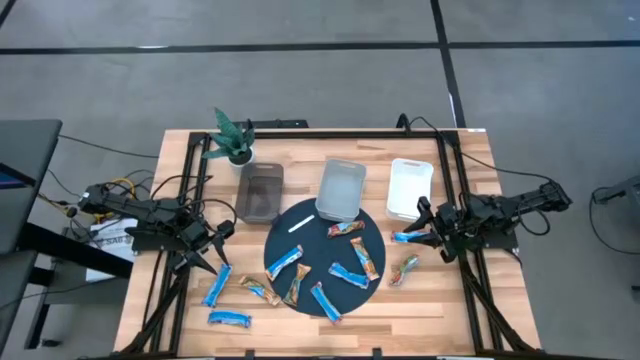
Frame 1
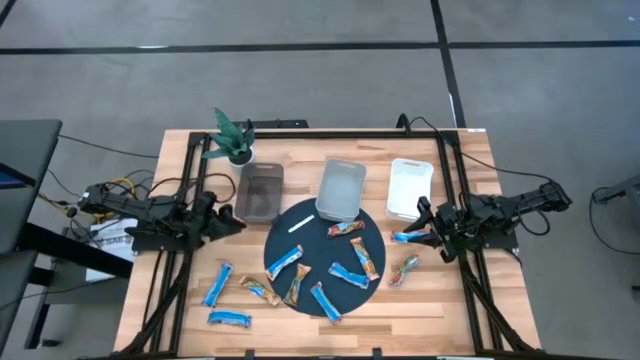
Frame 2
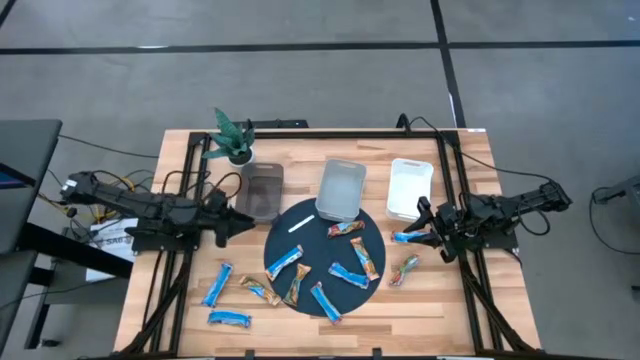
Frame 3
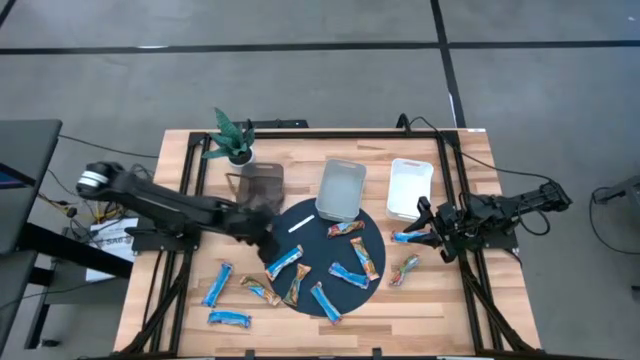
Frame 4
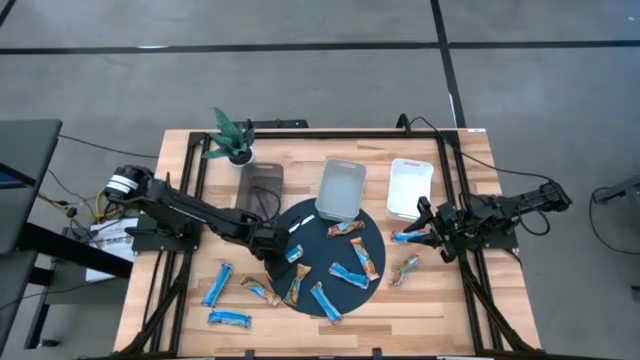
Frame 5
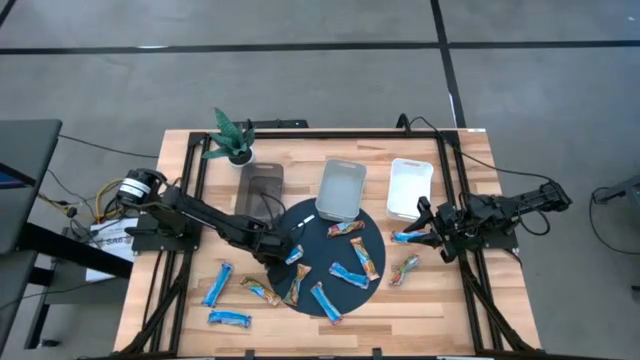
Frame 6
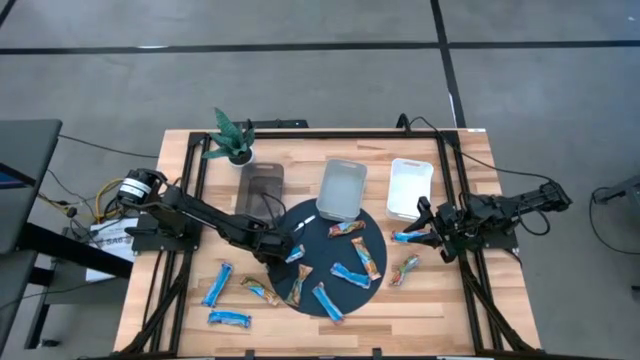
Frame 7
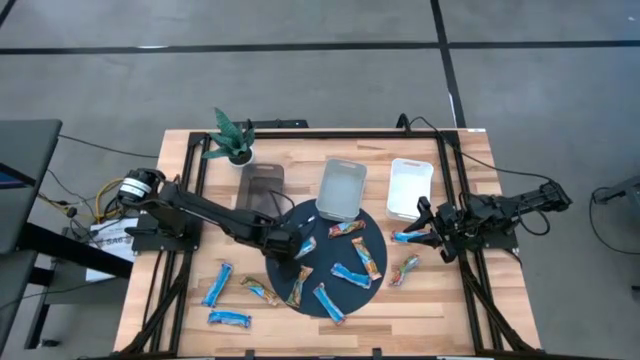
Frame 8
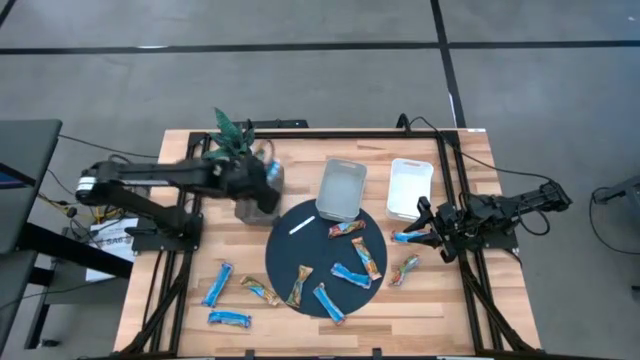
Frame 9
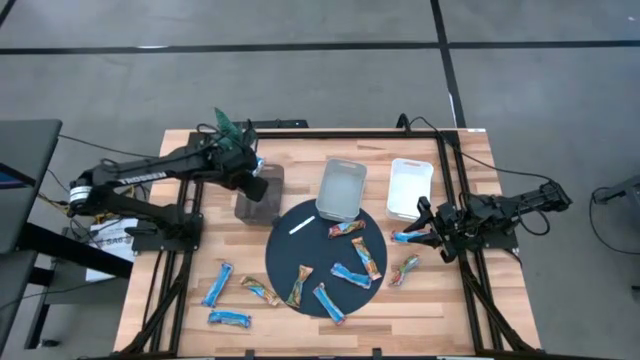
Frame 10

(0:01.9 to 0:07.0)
Task: Pick and place Granola Bars by type
Put the yellow granola bar into the black bin

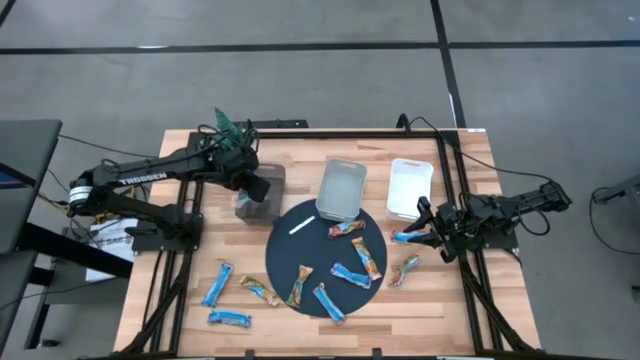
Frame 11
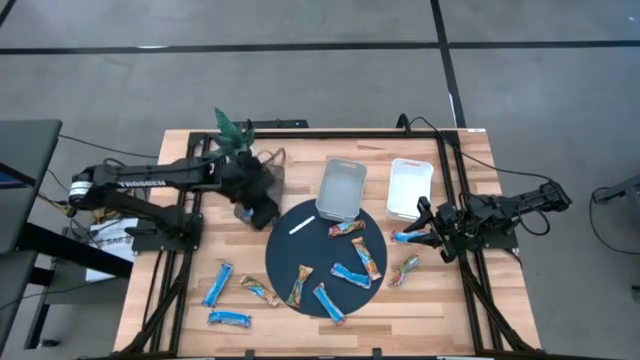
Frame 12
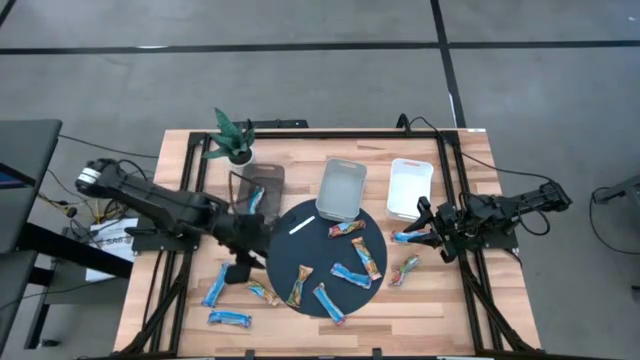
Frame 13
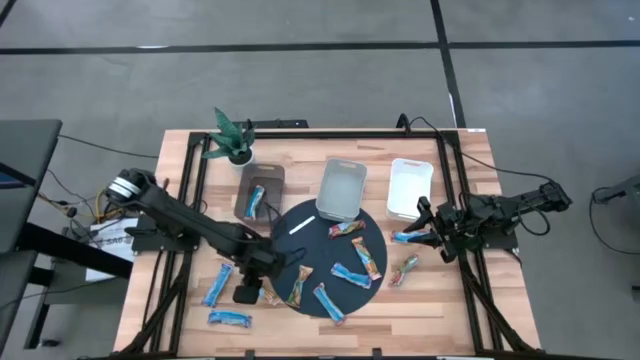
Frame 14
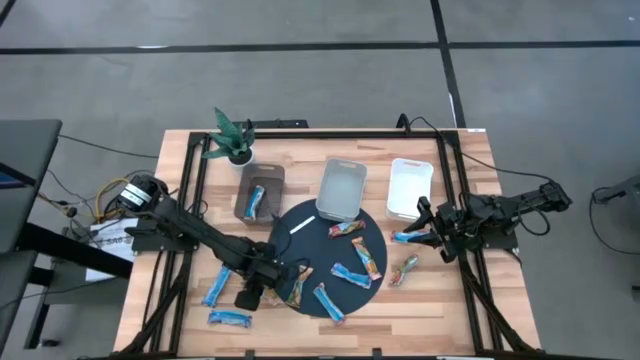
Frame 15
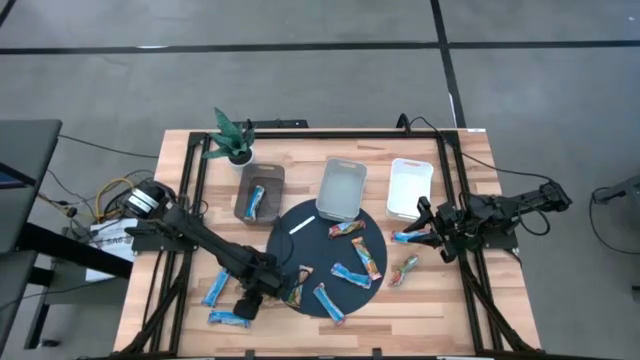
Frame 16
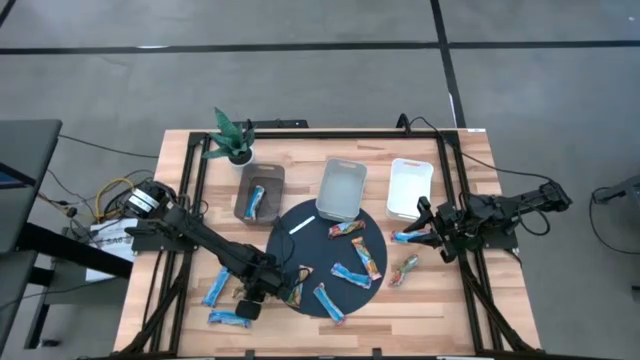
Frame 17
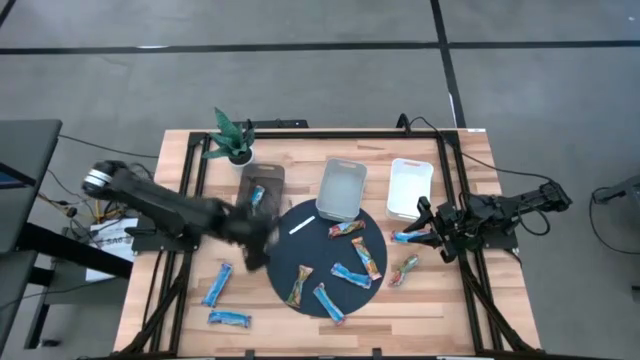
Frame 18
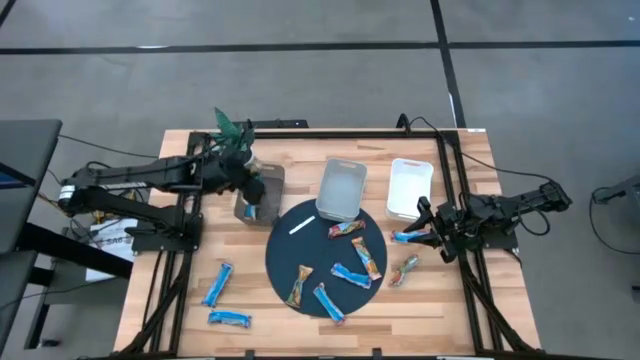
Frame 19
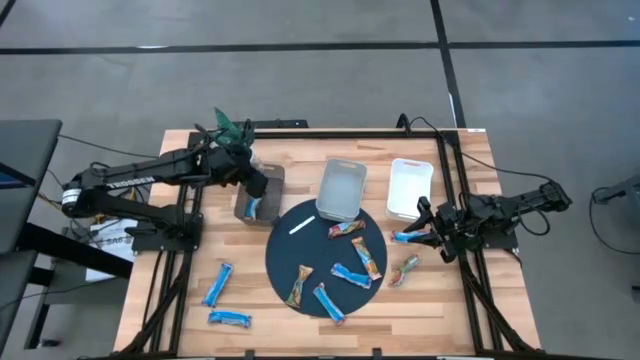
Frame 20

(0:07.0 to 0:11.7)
Put the yellow granola bar into the black bin

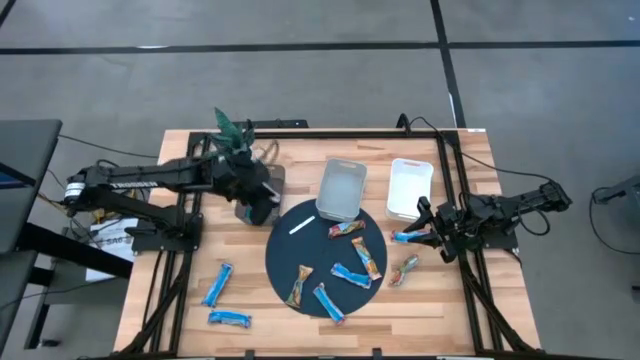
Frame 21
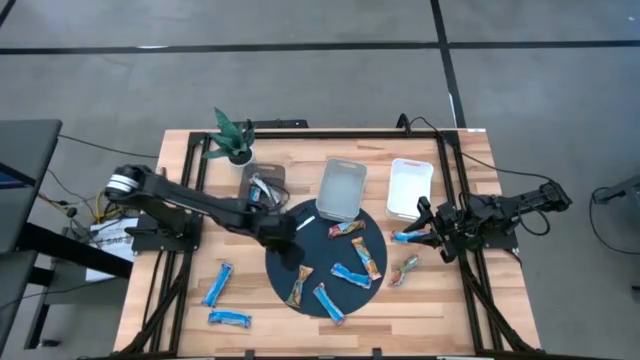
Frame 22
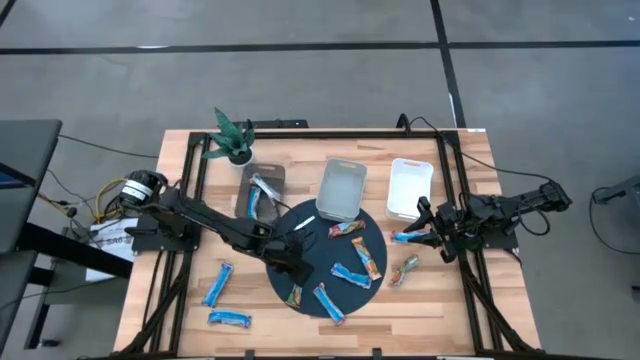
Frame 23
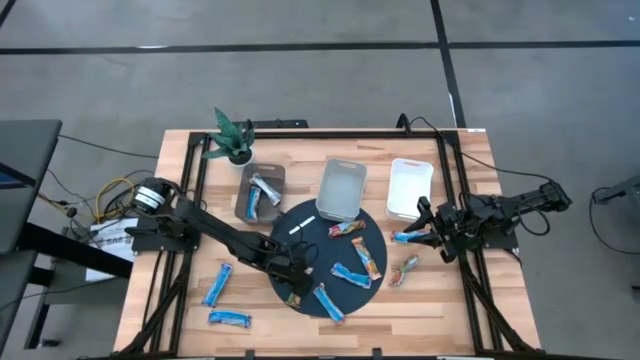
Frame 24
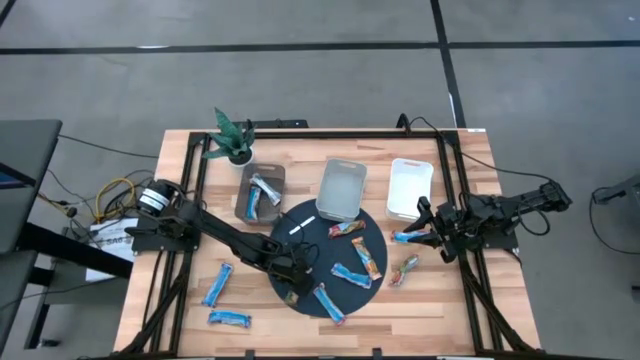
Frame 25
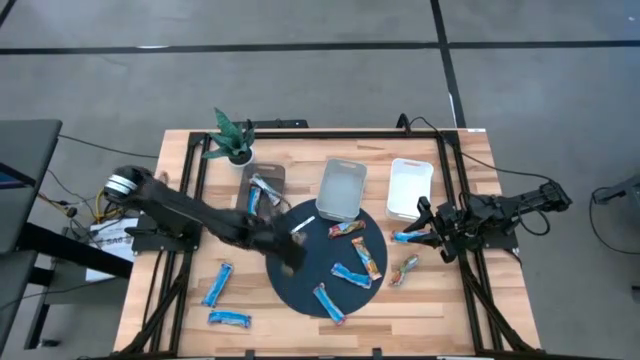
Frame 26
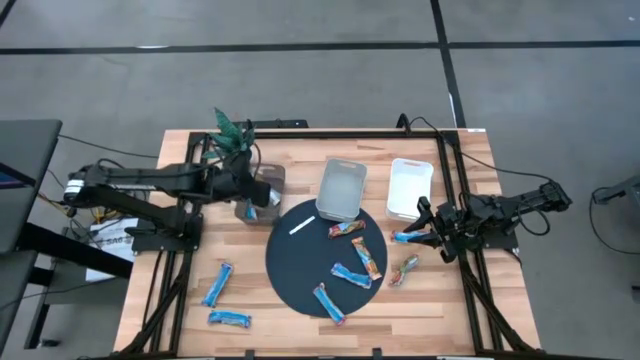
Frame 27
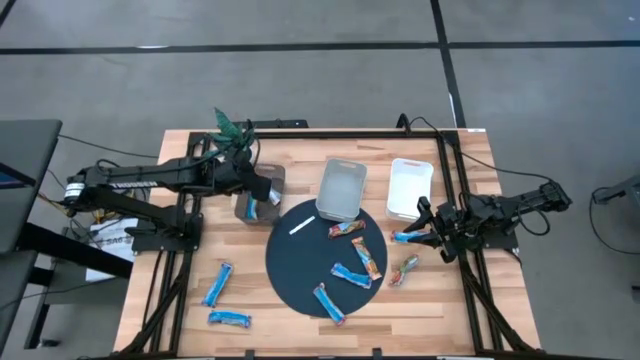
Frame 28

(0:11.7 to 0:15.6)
Put the yellow granola bar into the black bin

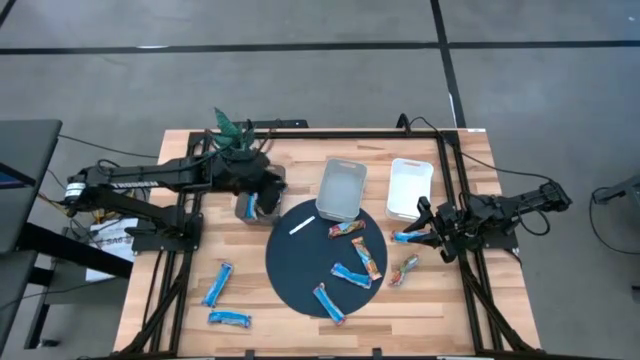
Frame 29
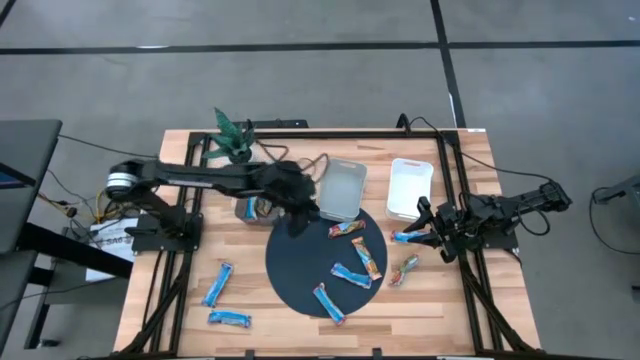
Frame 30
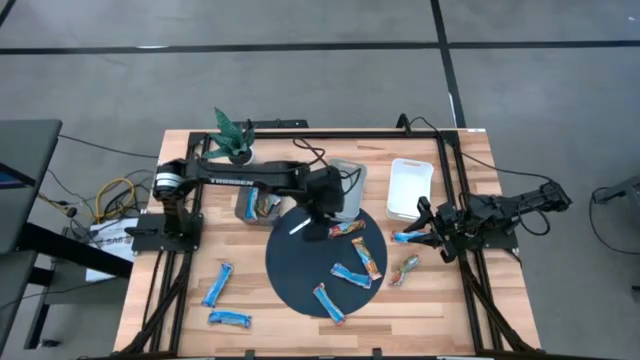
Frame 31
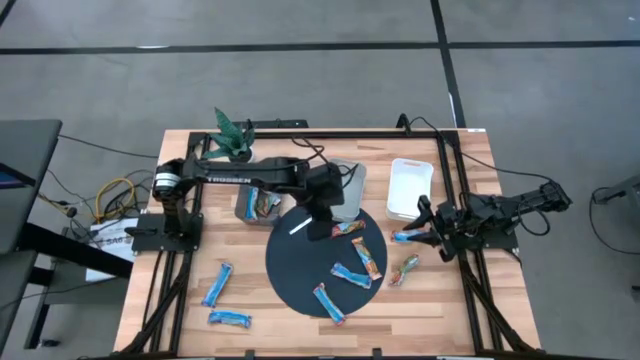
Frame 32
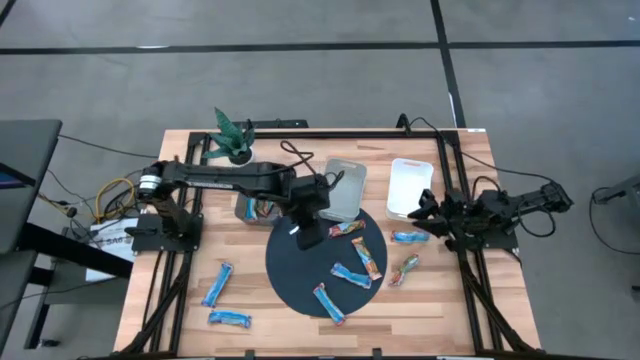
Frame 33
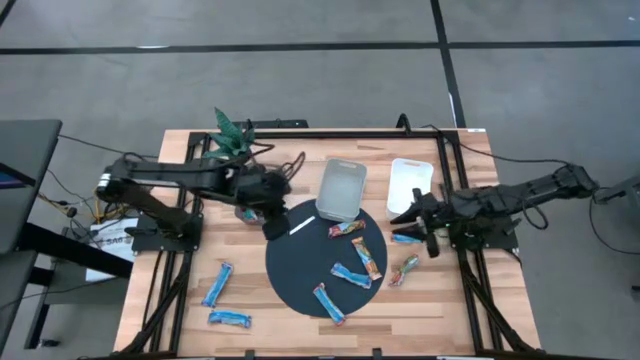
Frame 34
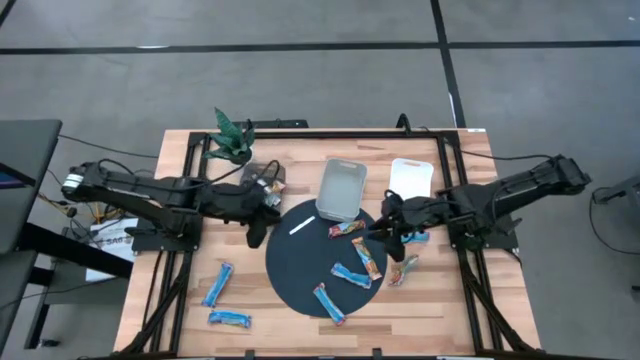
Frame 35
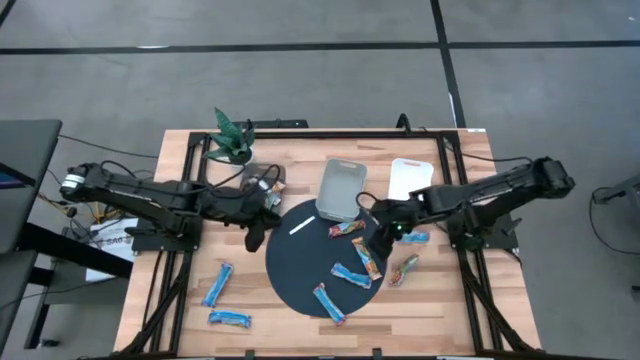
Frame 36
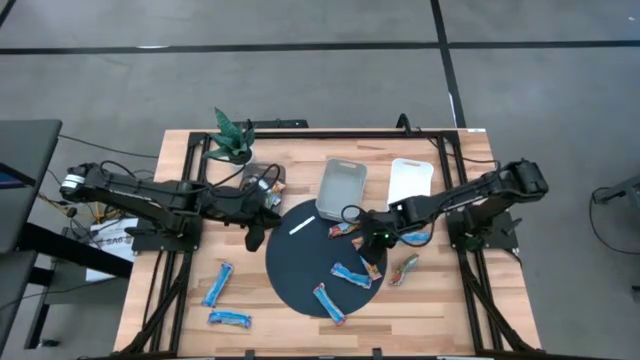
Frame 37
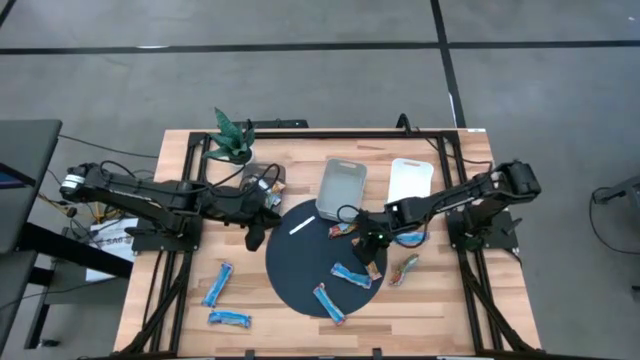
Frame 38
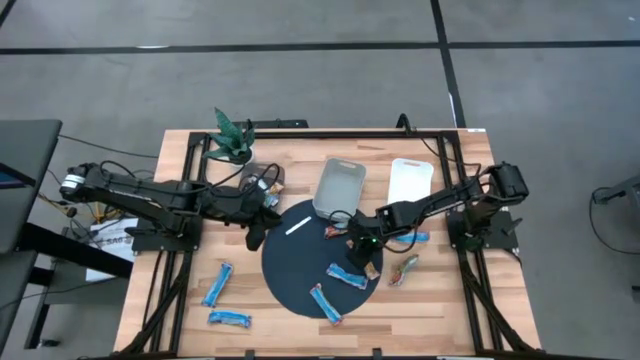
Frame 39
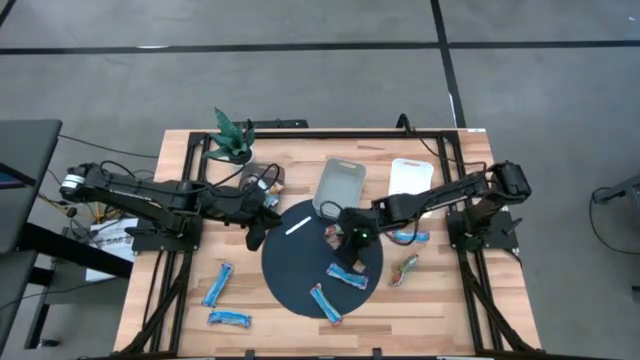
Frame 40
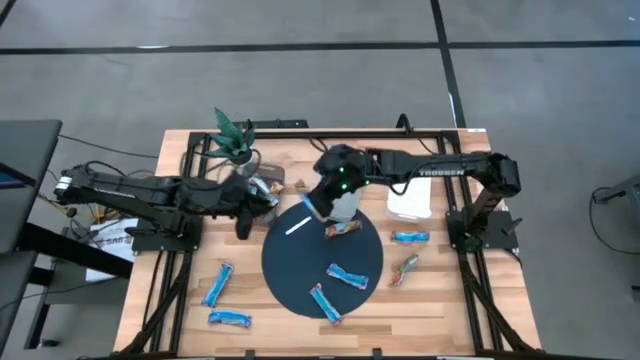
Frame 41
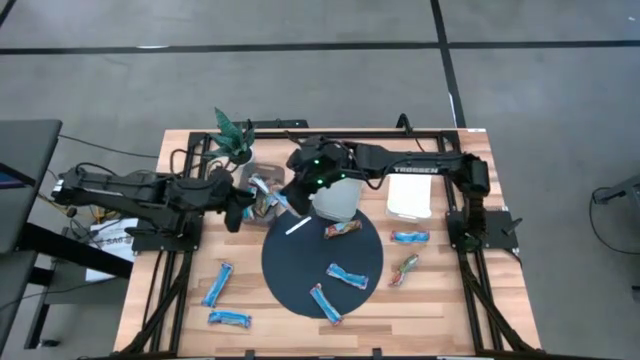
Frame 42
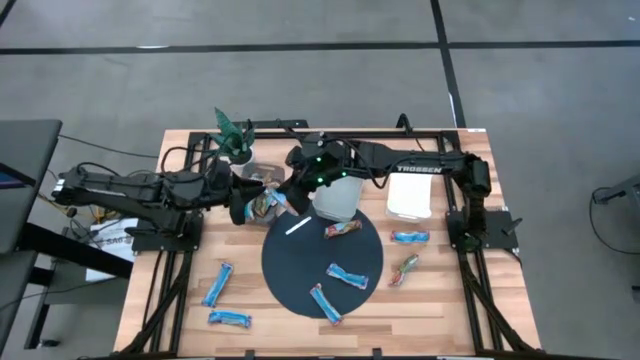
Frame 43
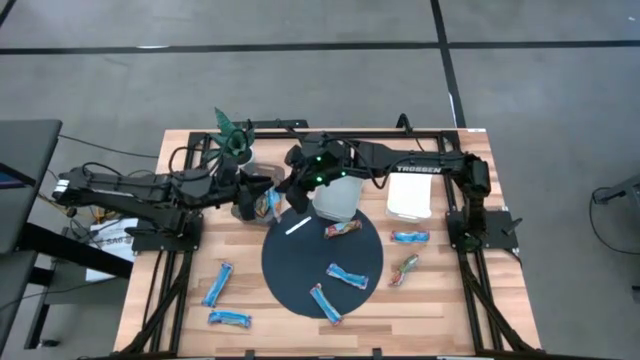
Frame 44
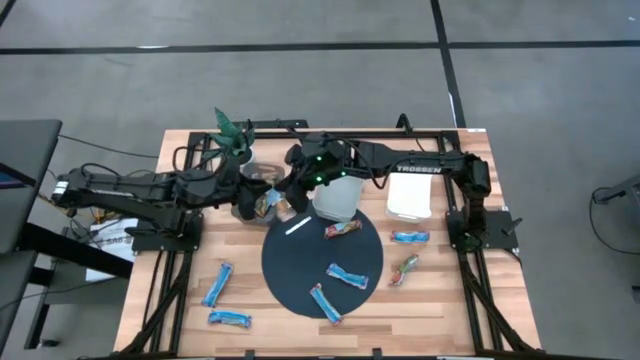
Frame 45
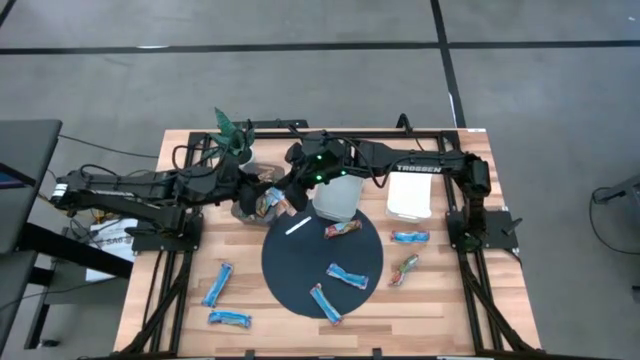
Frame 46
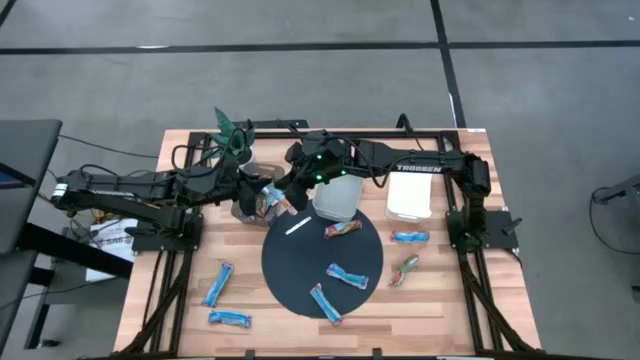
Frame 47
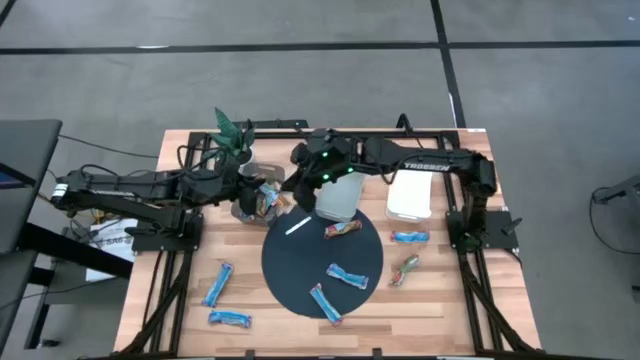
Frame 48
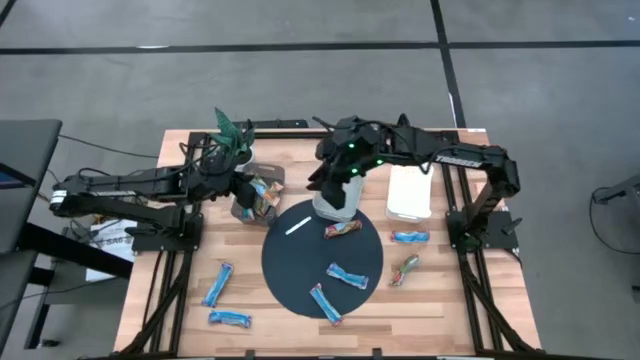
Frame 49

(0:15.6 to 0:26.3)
Put the yellow granola bar into the black bin
